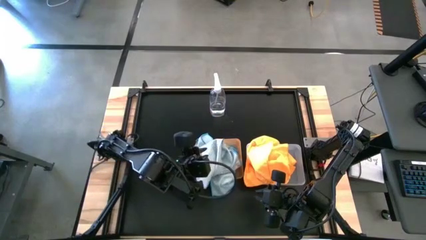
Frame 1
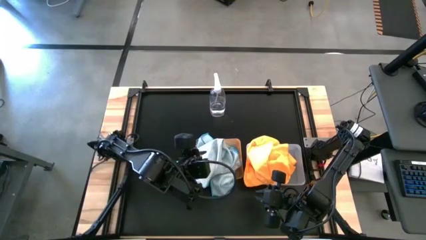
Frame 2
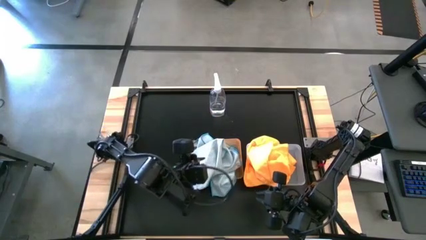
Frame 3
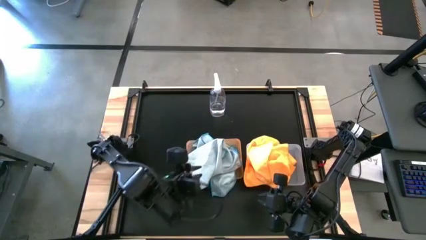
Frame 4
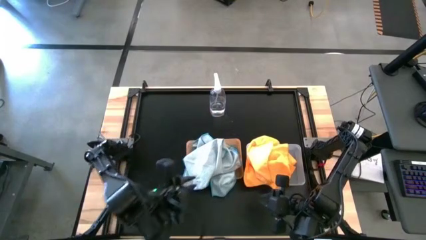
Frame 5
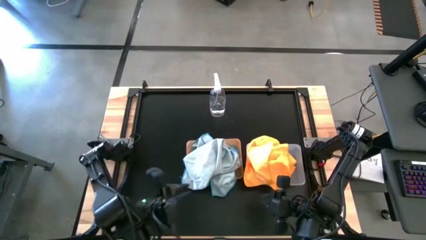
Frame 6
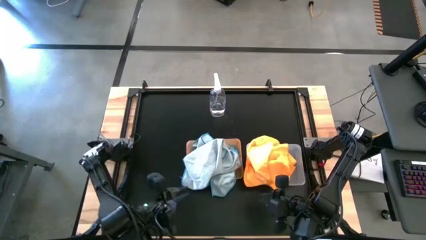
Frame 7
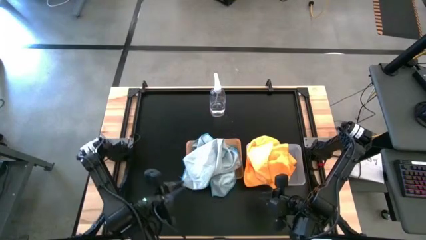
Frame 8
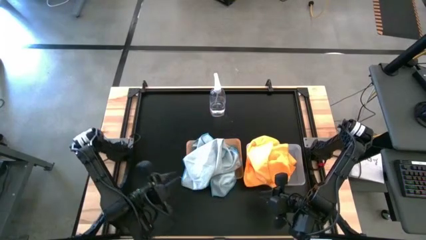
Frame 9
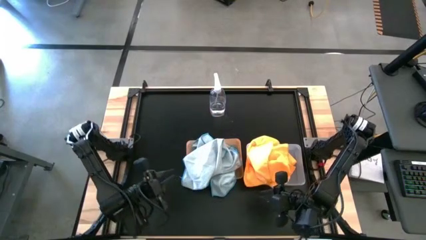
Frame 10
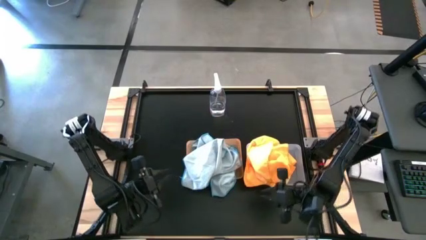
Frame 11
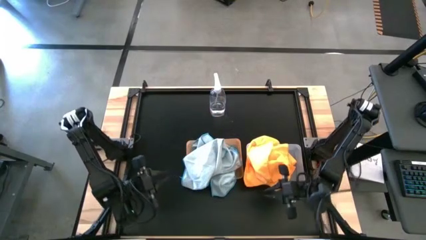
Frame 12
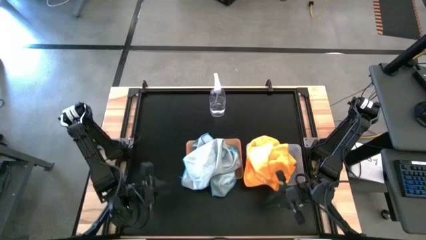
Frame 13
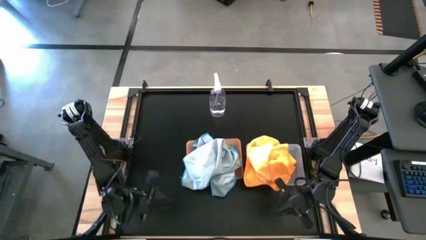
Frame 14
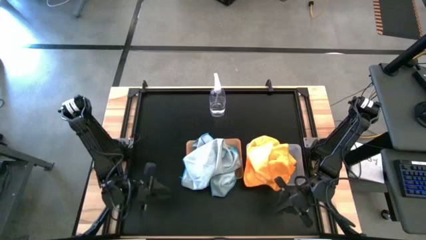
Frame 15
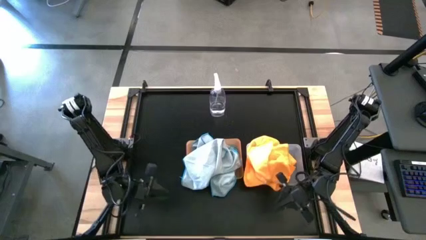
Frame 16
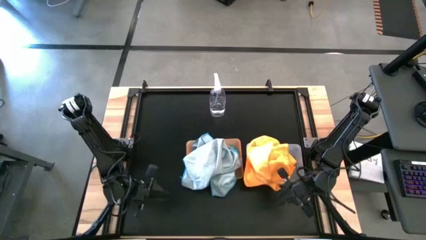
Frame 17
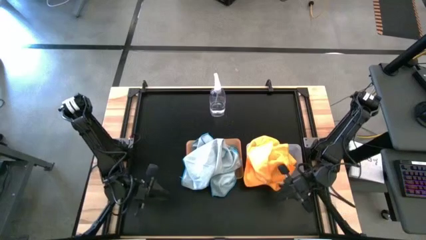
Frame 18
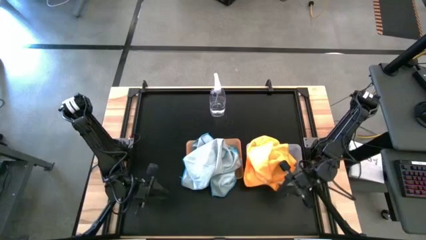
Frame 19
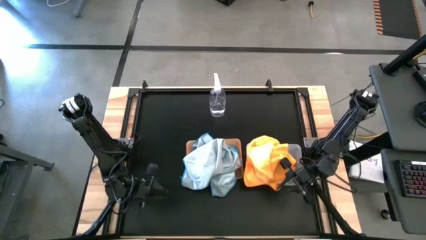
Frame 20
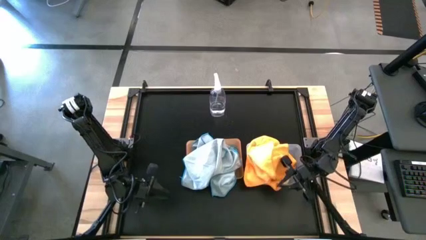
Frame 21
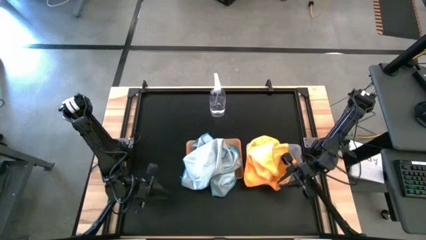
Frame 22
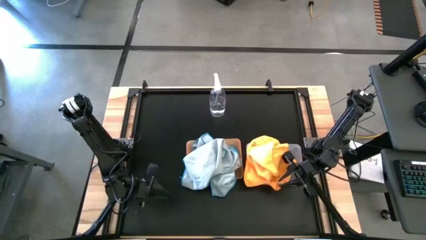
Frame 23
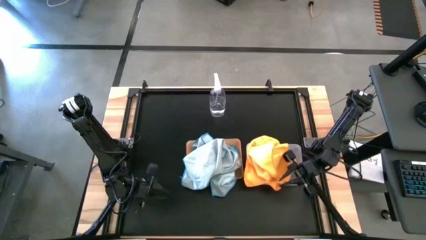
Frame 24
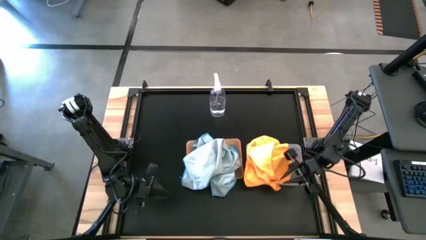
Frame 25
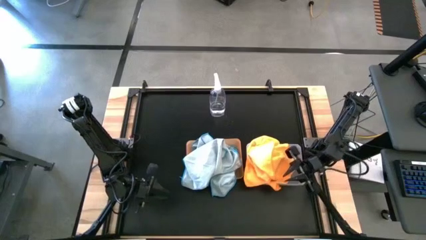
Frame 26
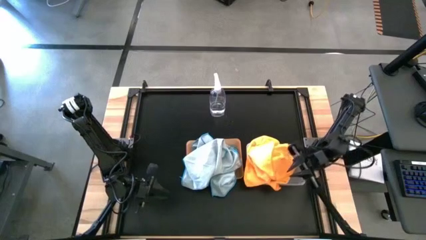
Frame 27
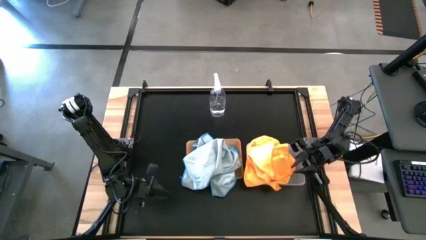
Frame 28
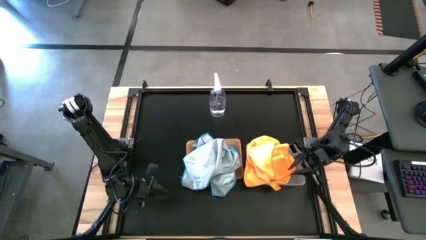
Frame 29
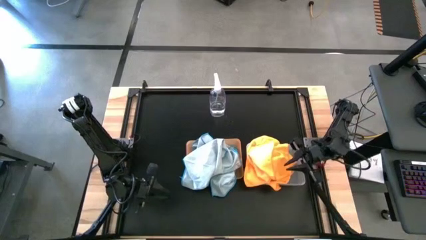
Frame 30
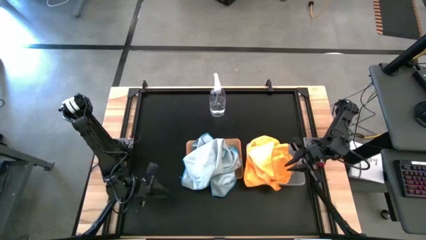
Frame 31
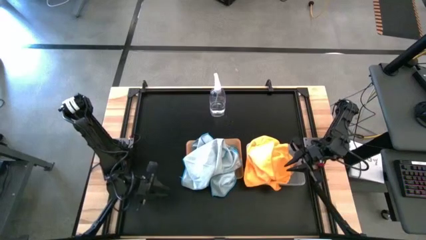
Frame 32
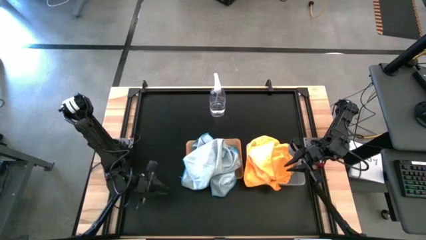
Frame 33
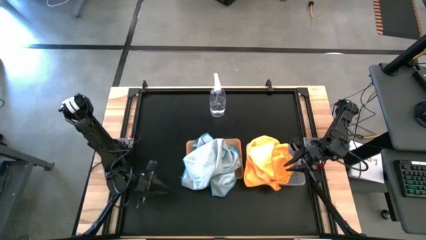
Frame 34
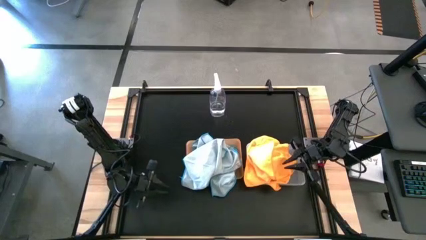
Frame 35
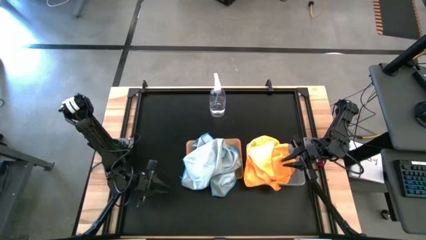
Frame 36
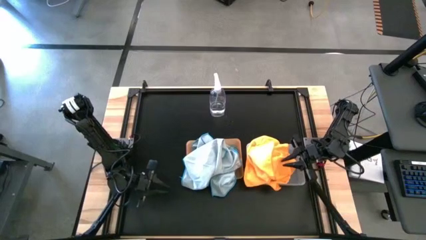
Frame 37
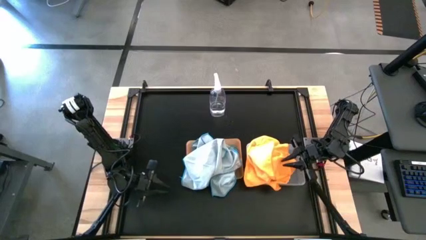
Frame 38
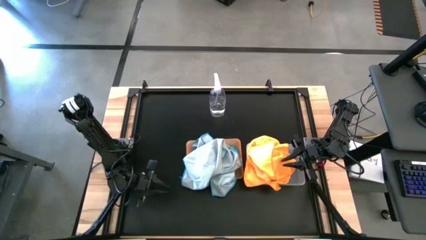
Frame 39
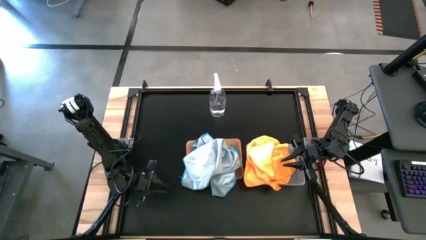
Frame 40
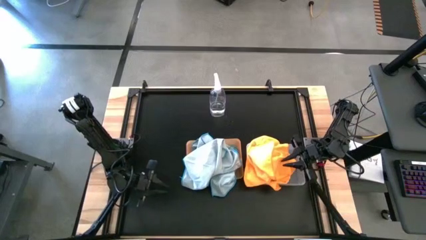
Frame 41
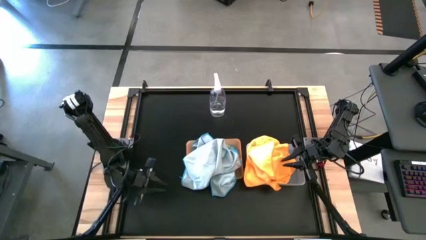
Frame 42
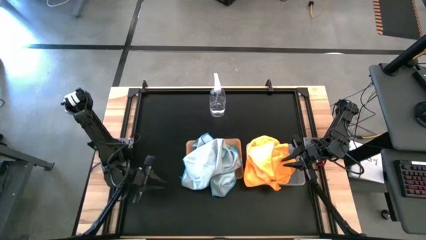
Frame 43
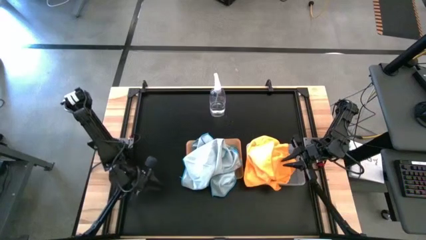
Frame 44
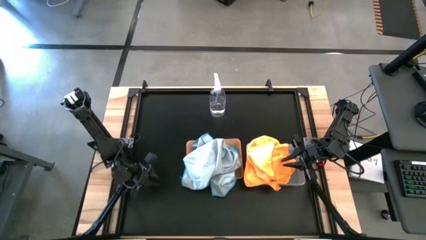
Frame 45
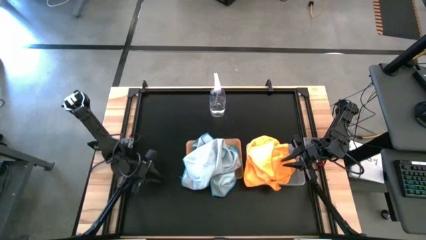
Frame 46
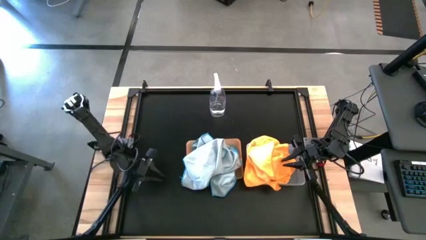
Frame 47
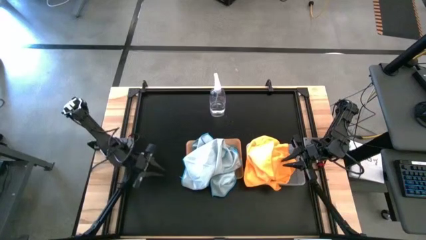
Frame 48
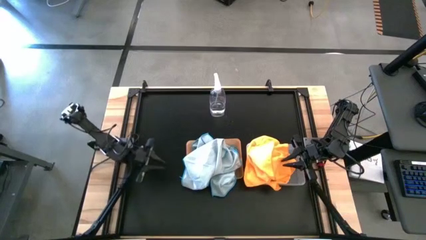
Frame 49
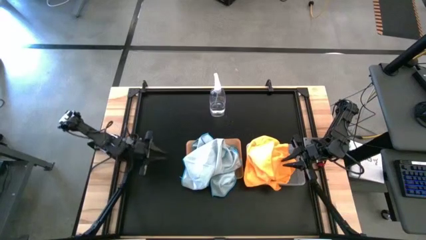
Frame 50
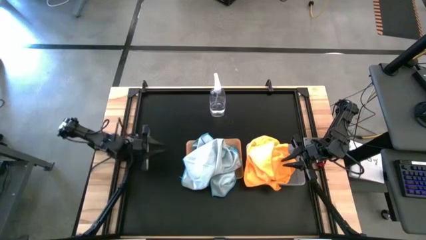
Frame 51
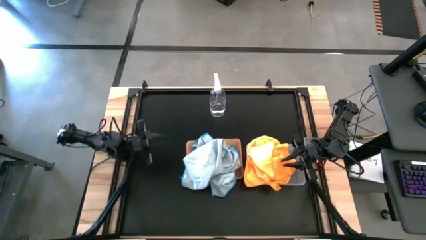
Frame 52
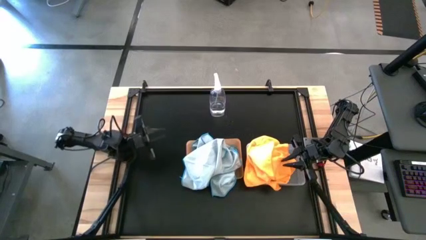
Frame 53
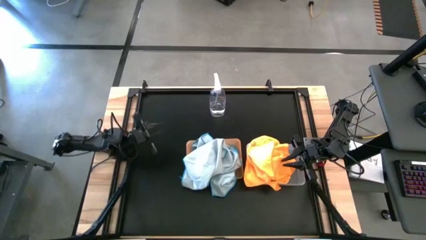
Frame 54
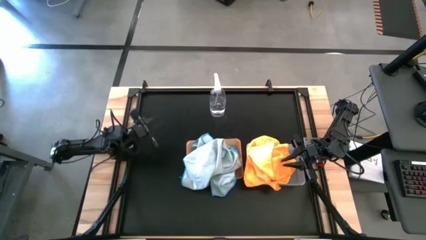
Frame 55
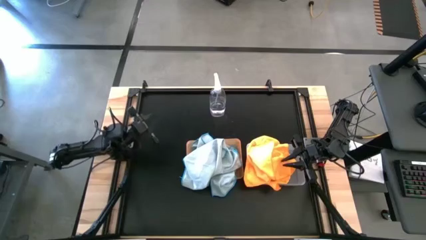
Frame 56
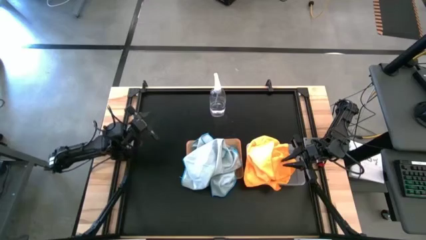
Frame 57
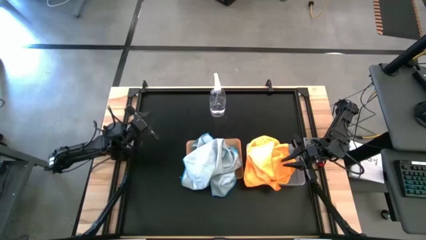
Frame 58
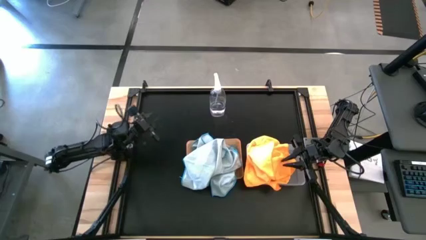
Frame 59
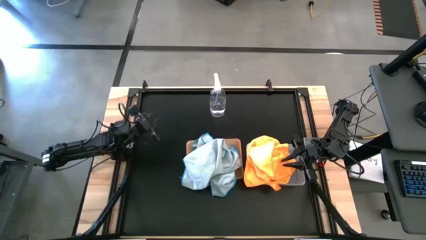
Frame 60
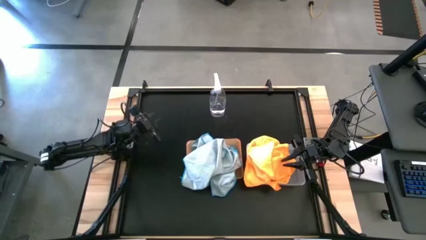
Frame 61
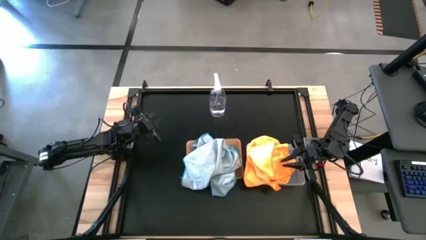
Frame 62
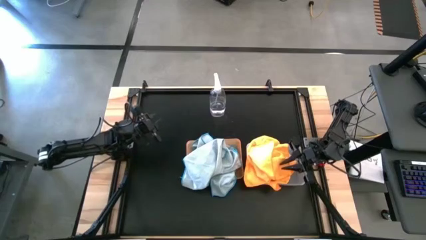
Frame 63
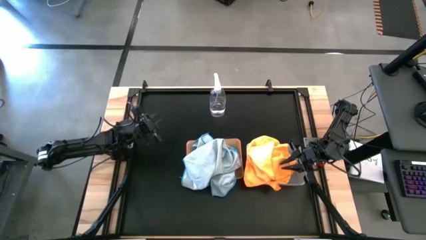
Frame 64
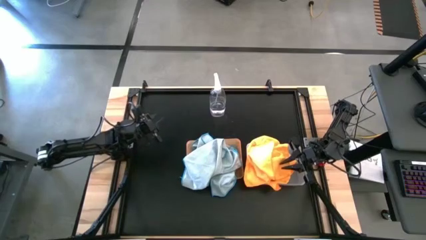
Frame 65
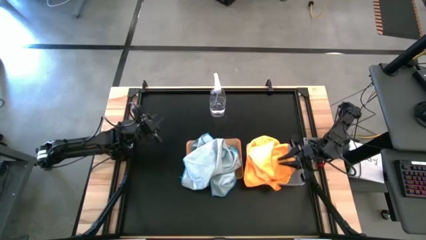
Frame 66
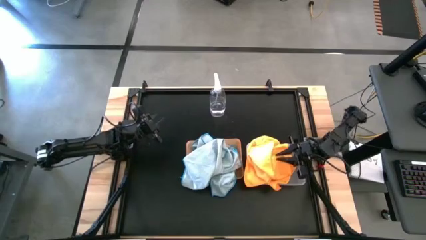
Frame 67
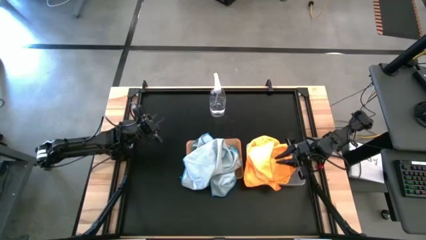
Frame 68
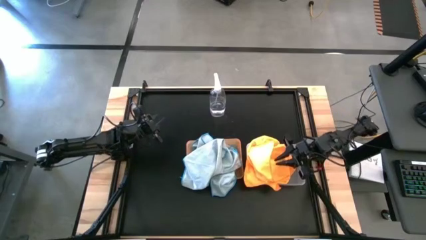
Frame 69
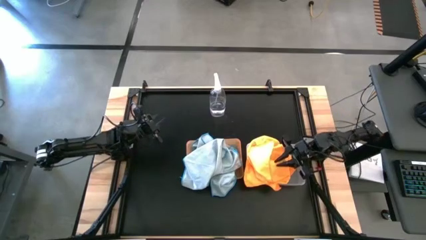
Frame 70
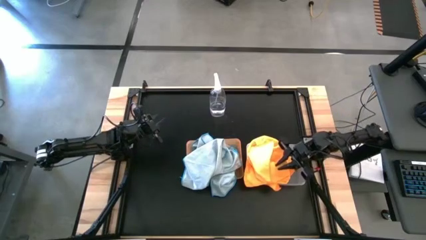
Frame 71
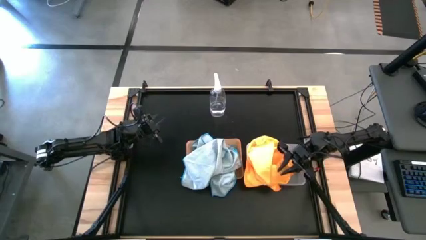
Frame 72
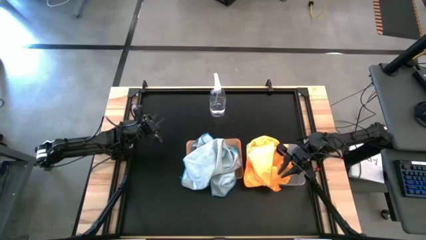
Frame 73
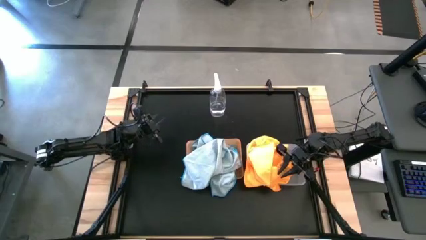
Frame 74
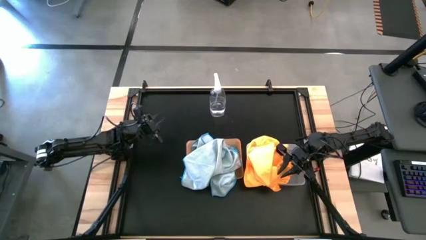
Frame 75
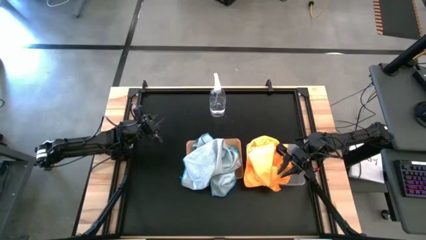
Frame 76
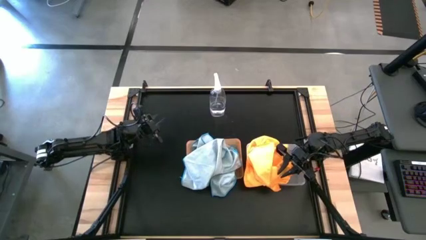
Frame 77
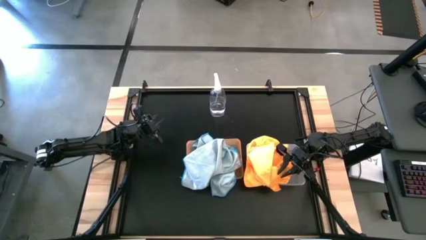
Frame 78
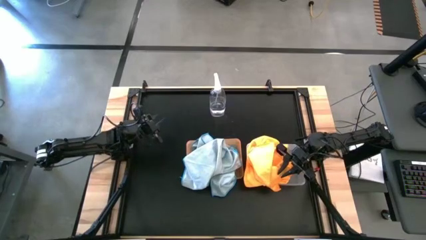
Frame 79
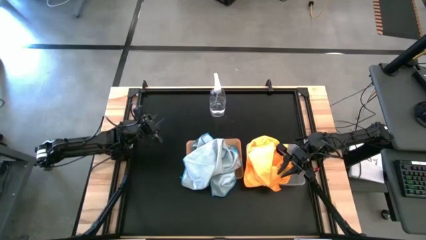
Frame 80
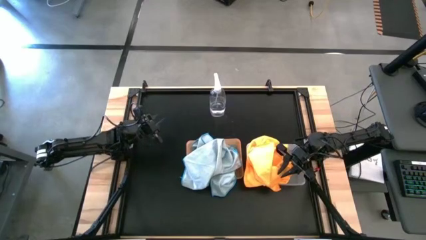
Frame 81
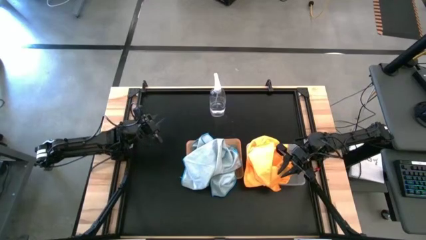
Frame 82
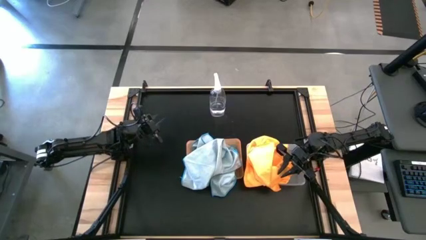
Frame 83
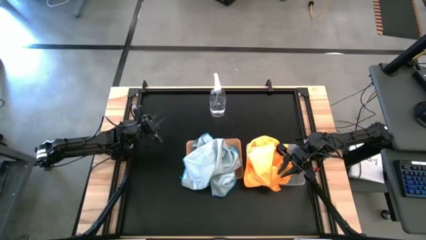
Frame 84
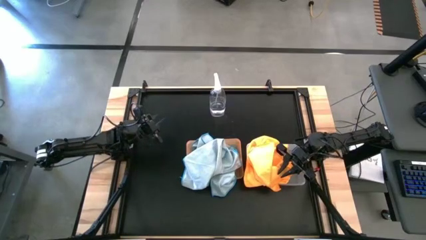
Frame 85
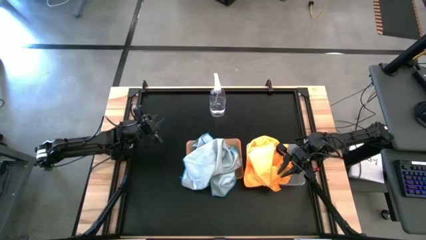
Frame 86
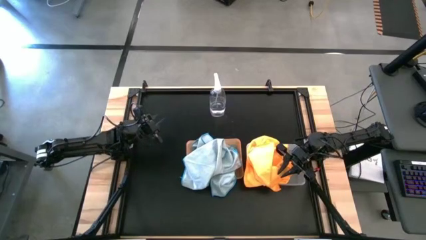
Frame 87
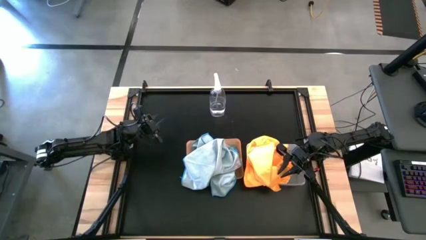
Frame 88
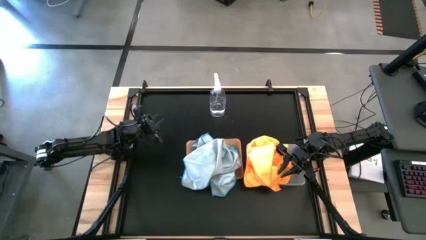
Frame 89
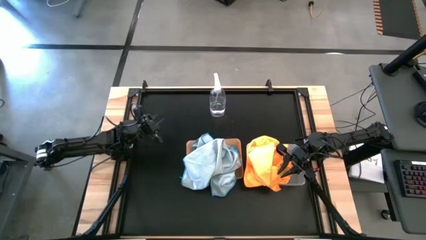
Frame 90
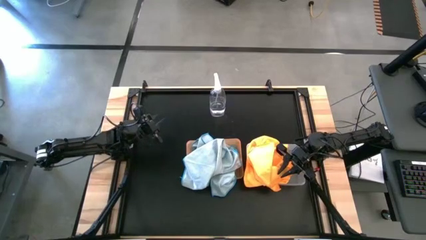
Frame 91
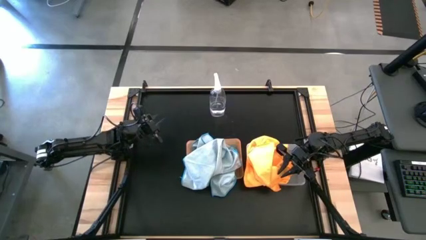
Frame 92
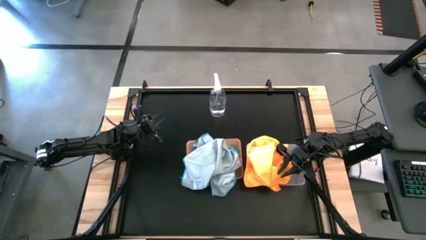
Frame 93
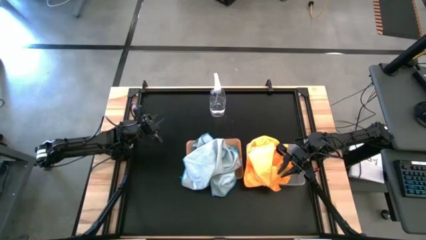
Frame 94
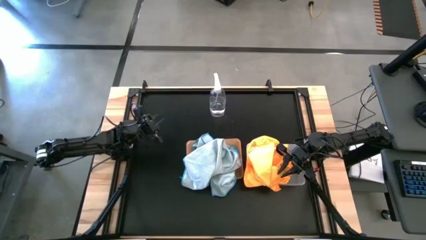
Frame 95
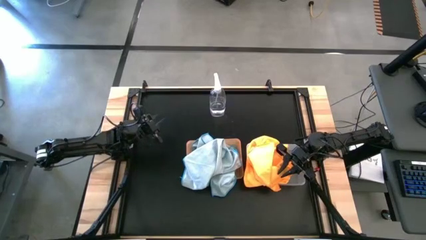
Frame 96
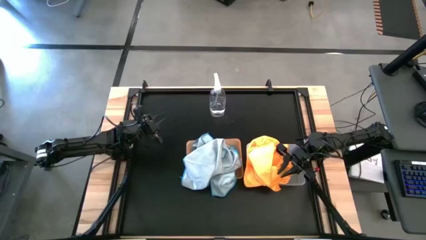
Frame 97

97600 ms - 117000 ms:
Task: Sort microfiber towel by color & place in baskets
Return to Home Position
